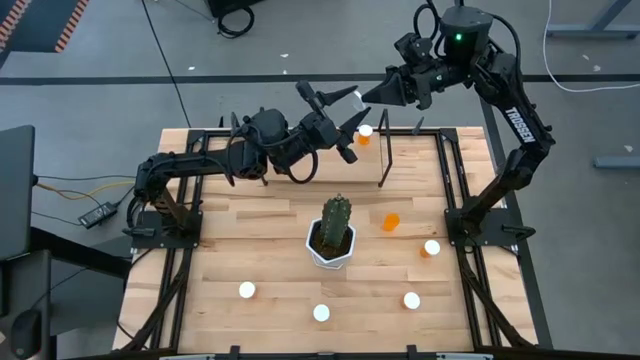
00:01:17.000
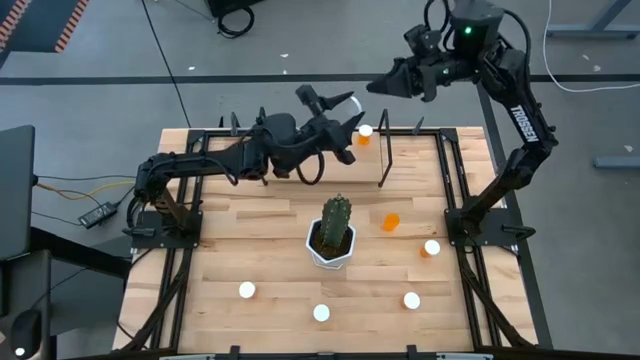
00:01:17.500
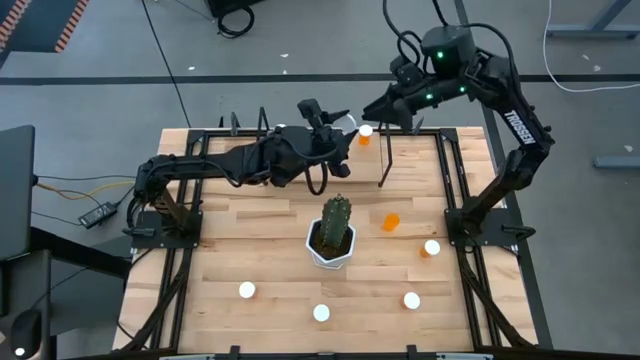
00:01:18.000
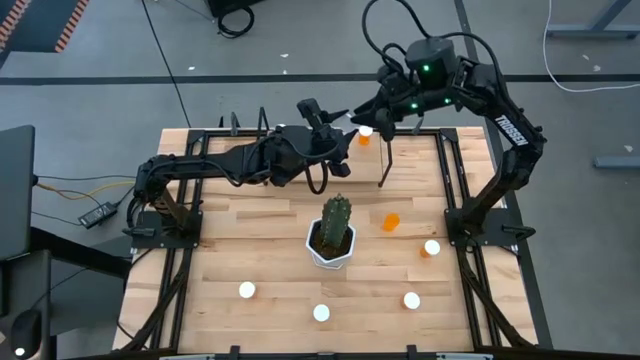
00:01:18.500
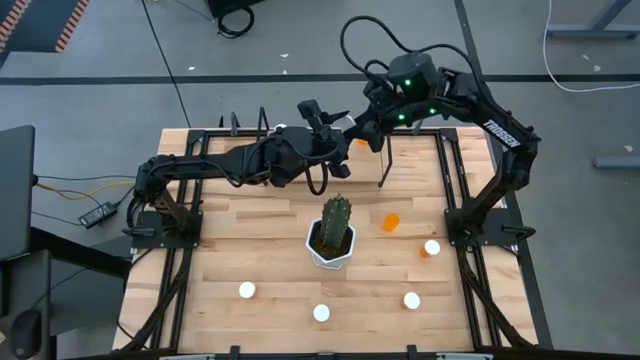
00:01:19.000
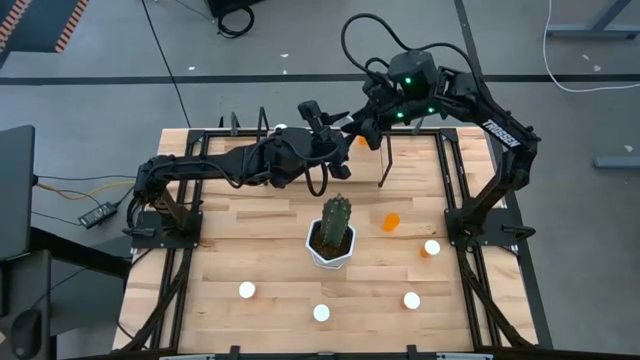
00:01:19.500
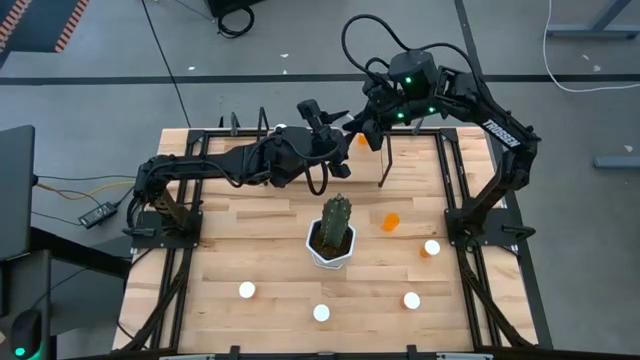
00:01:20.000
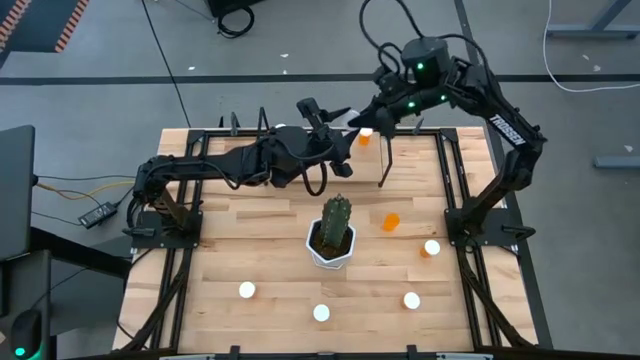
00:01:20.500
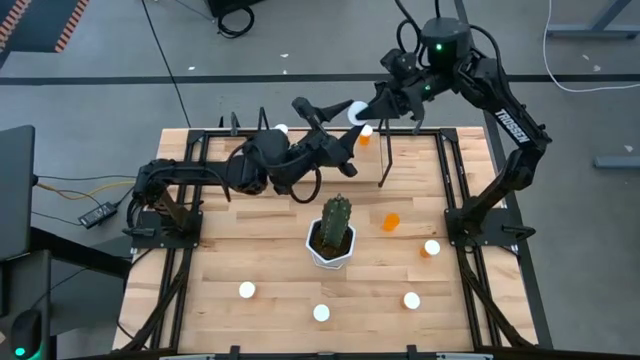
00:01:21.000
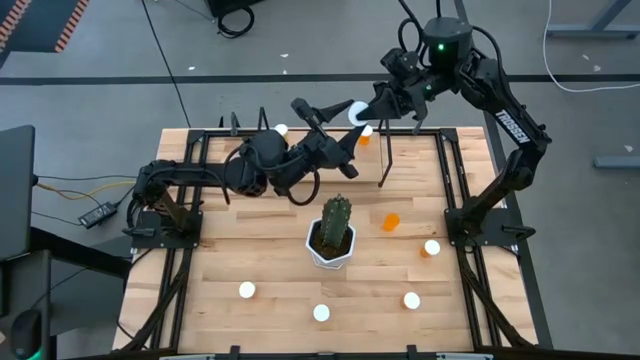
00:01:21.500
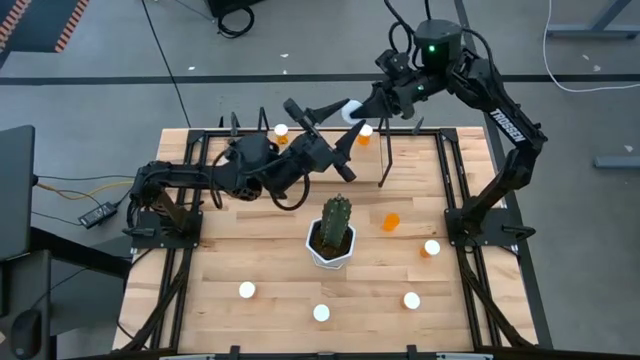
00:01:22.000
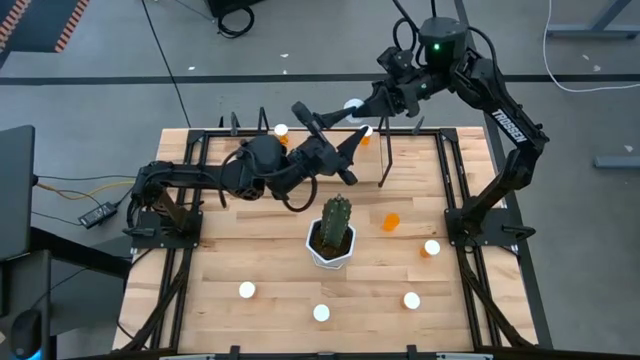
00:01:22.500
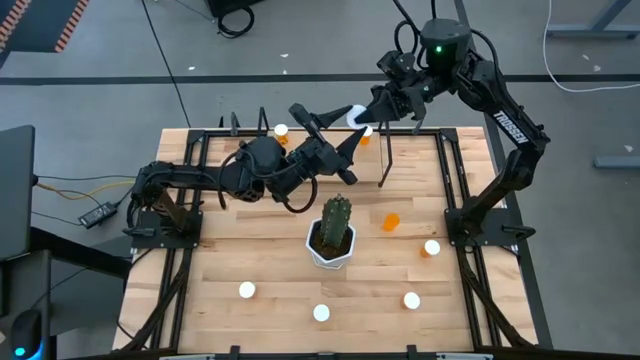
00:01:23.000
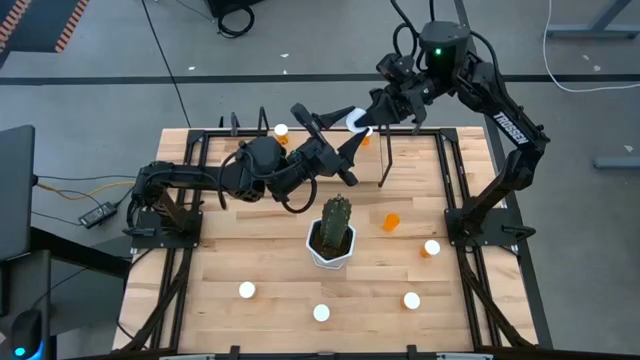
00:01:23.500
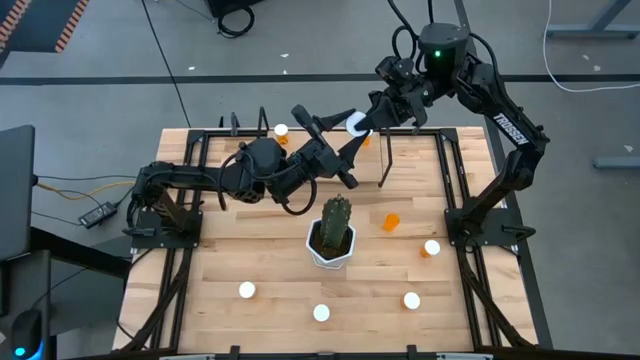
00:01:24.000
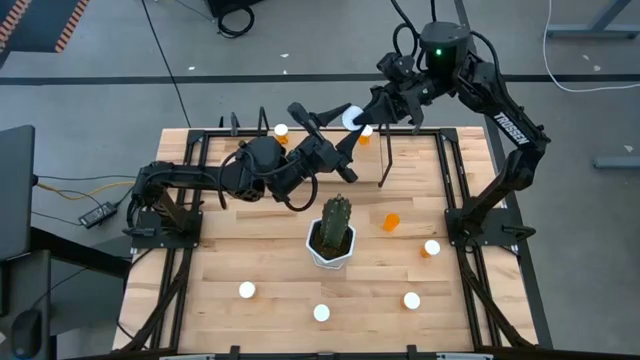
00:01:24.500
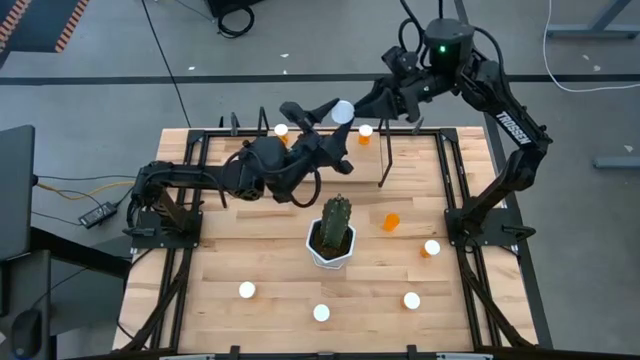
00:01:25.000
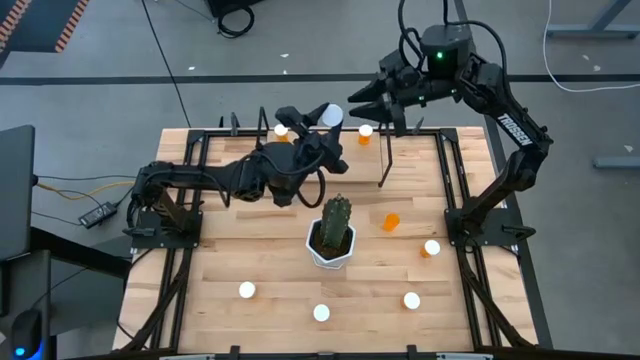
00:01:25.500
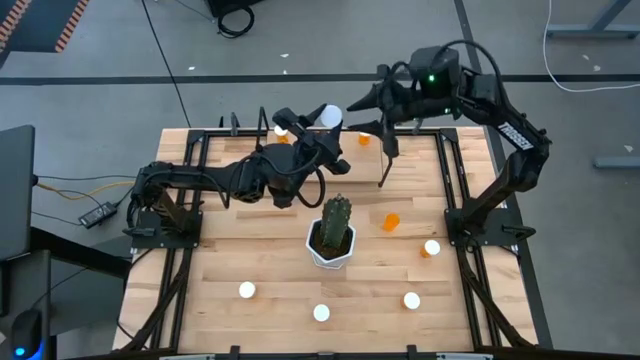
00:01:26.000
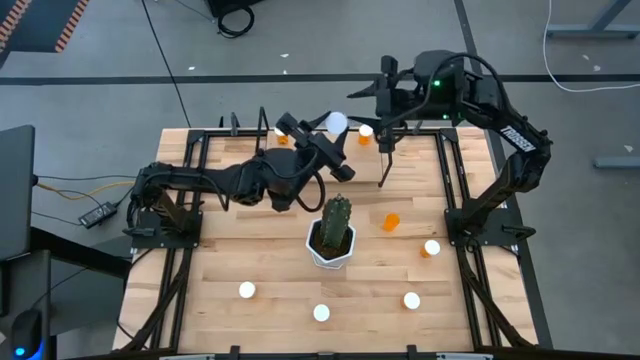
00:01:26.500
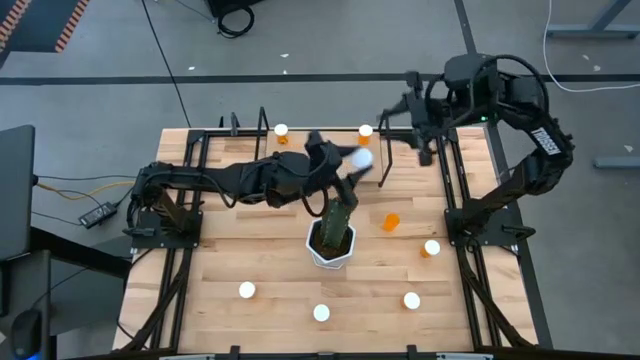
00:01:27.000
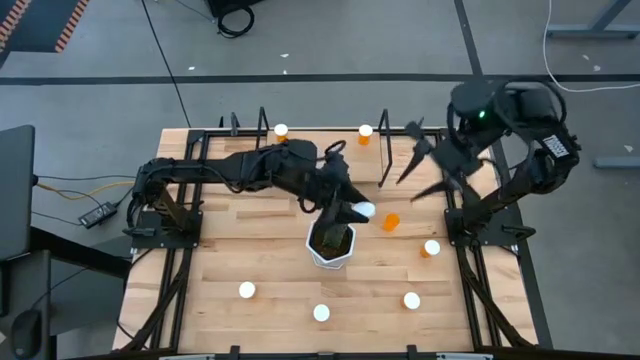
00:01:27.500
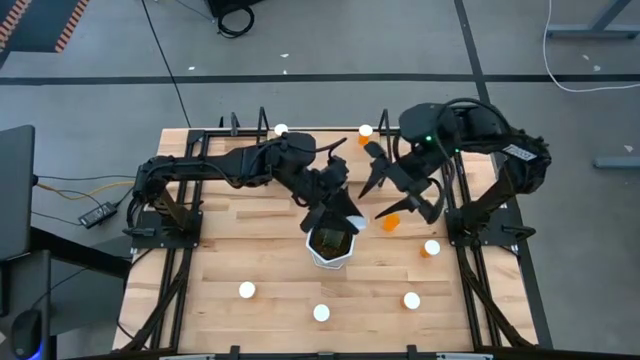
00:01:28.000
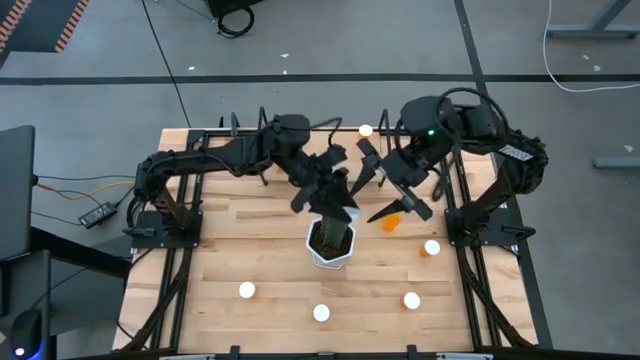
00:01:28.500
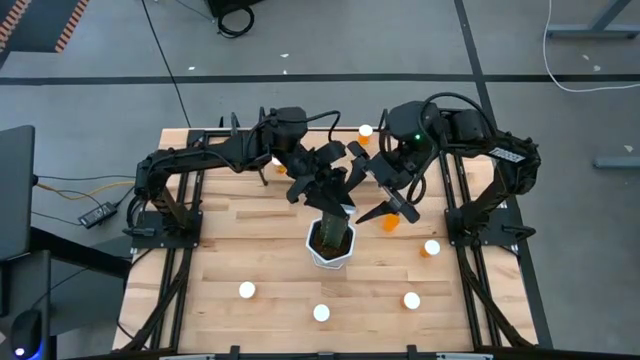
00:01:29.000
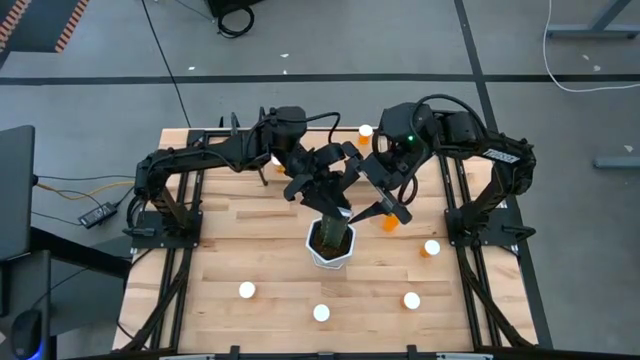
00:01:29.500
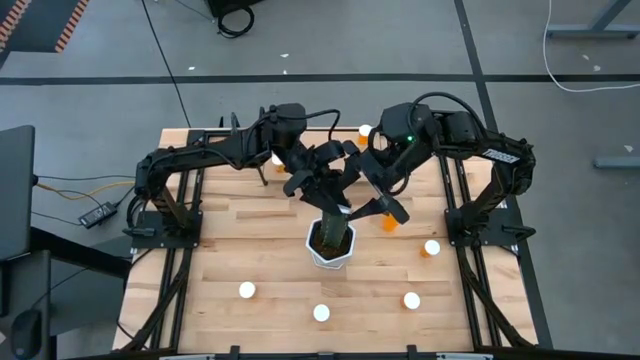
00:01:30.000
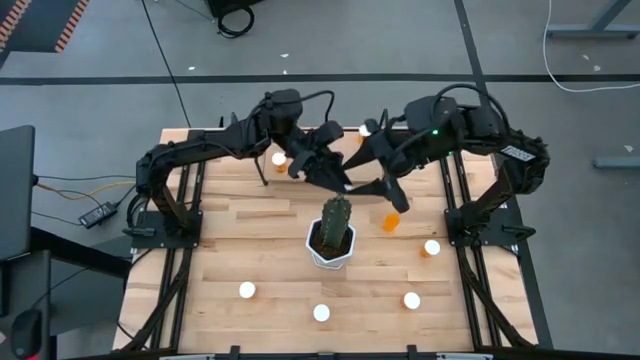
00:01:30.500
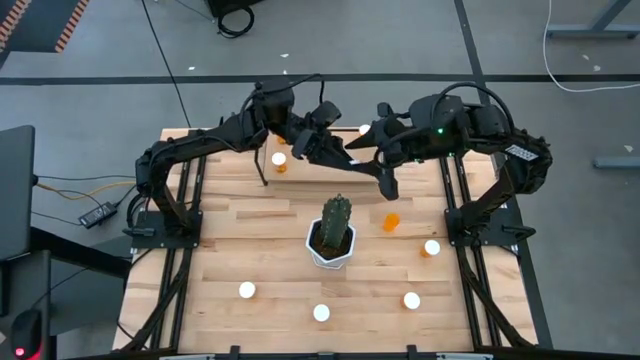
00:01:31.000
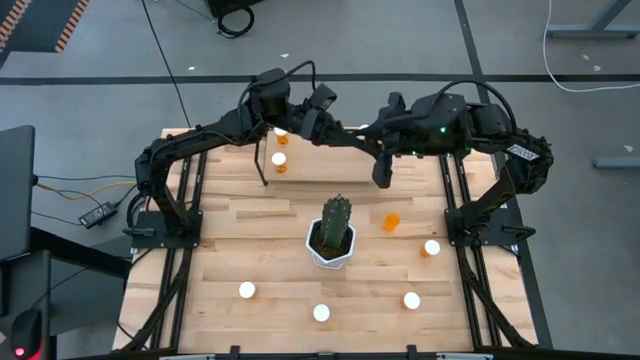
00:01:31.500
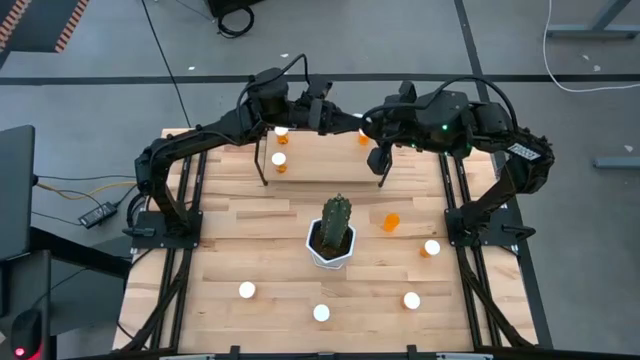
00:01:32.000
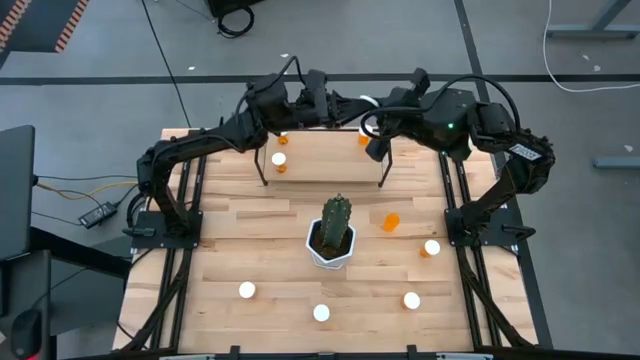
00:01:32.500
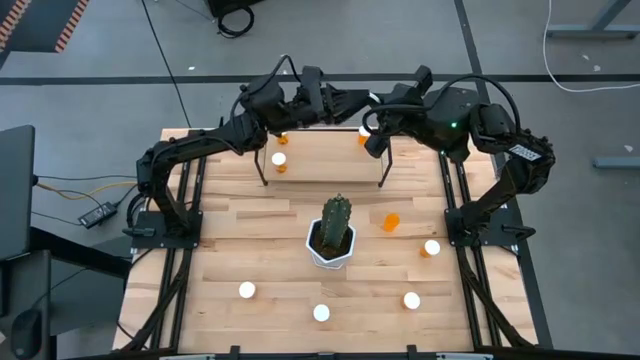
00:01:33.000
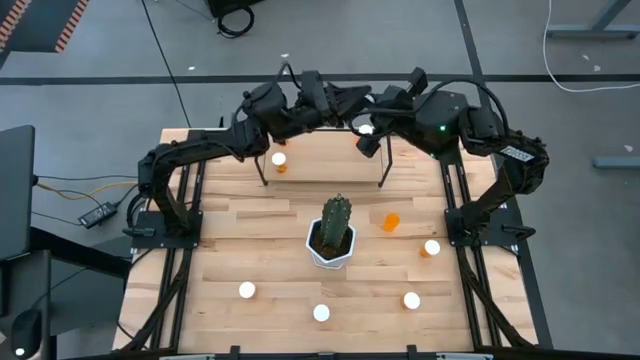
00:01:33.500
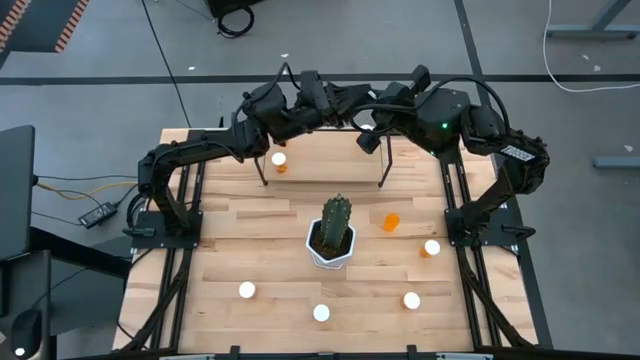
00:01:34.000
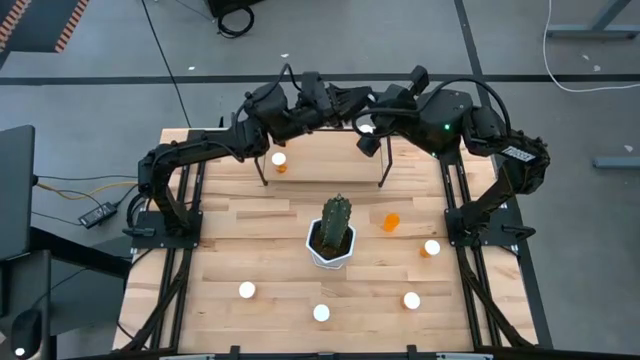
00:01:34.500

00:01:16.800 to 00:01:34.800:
Task: Pick and place medicine bottles onto shelf by color
Put the orange medicine bottle on the shelf

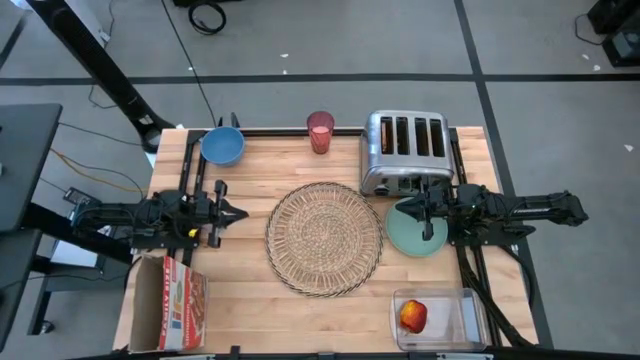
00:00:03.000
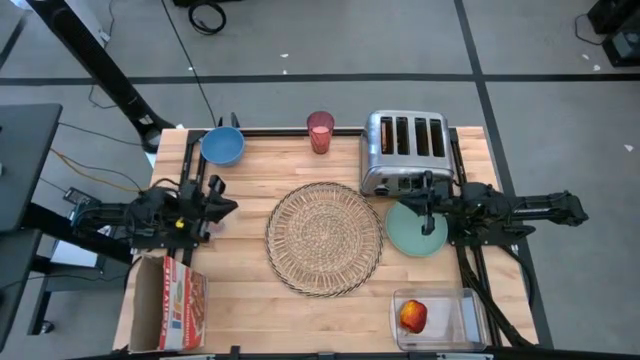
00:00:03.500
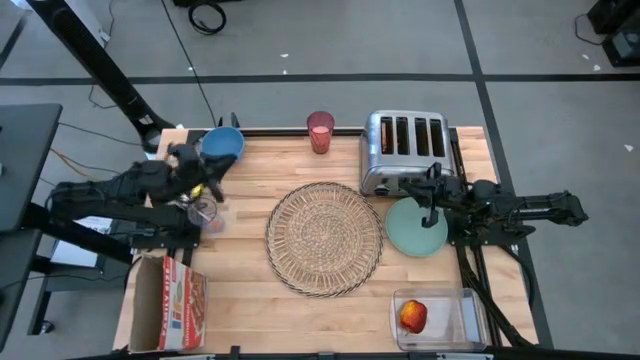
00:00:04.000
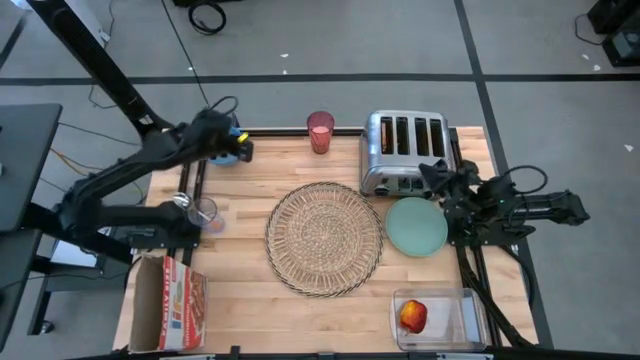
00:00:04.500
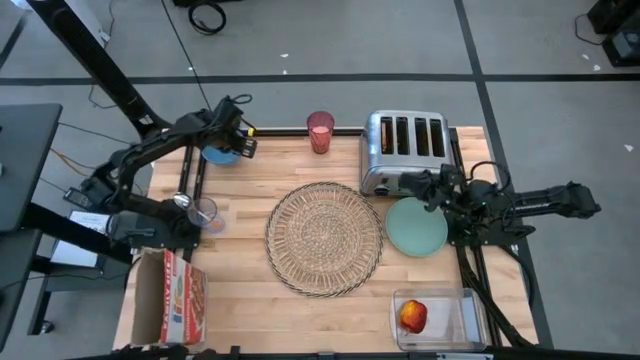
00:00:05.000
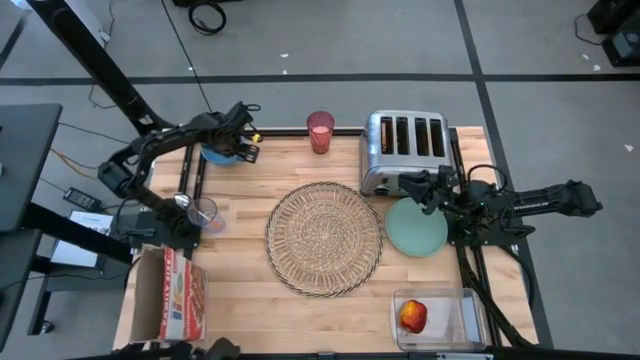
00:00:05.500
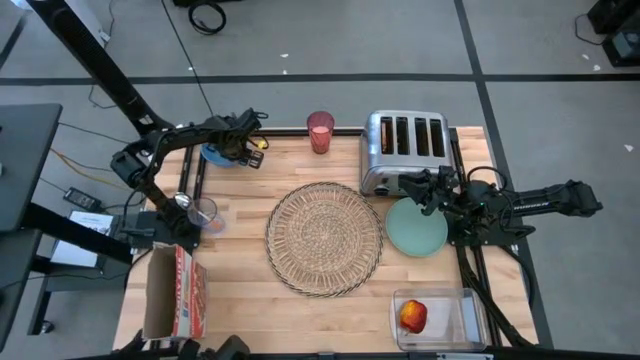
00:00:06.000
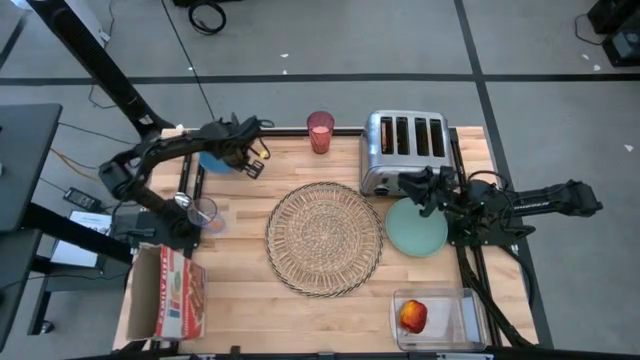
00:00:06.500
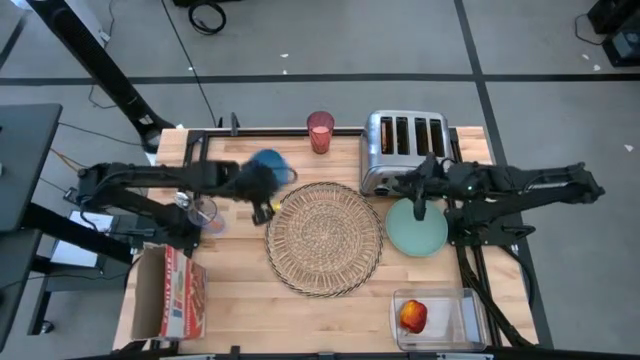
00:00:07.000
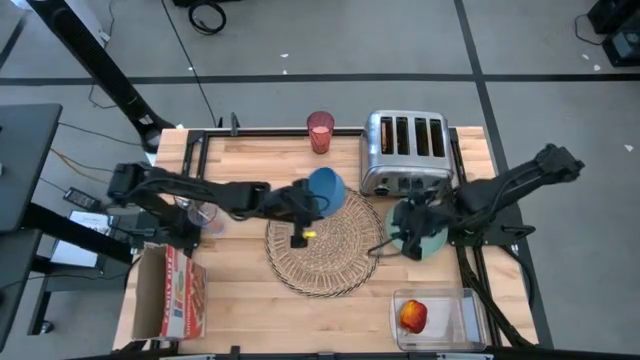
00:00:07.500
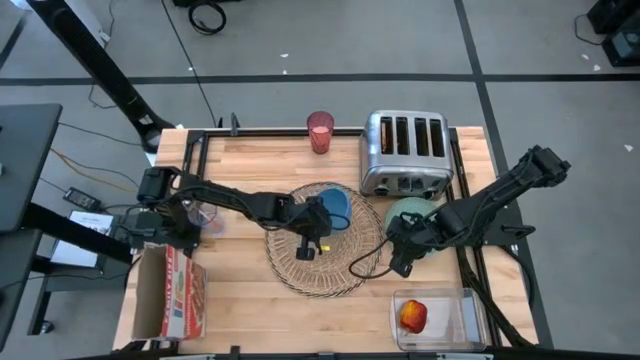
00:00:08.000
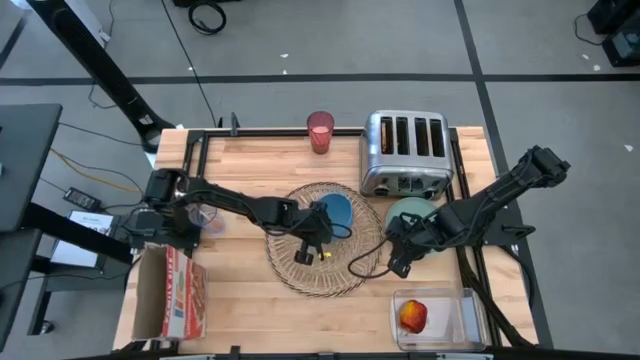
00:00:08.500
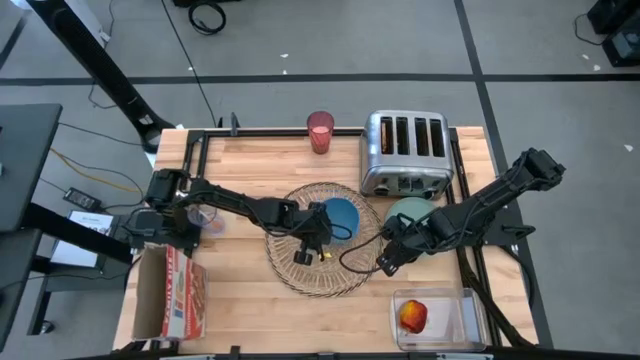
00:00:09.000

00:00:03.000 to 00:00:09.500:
Task: Arrange a breakfast setting
Put the blue bowl on the placemat
